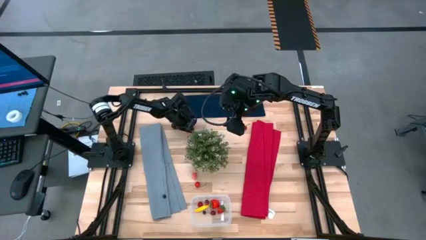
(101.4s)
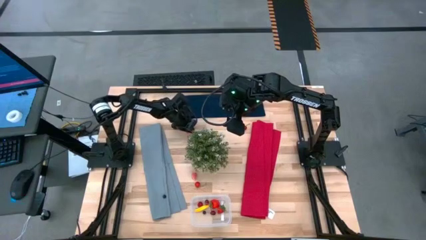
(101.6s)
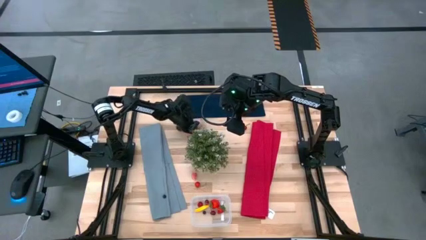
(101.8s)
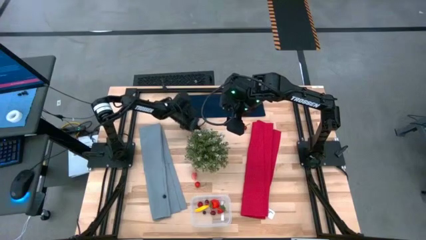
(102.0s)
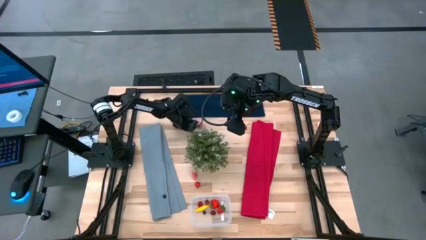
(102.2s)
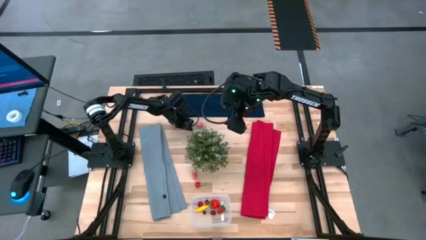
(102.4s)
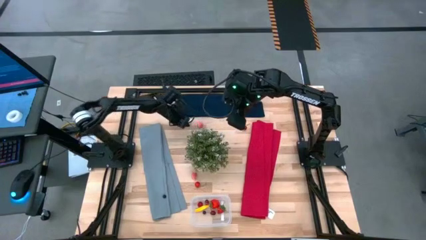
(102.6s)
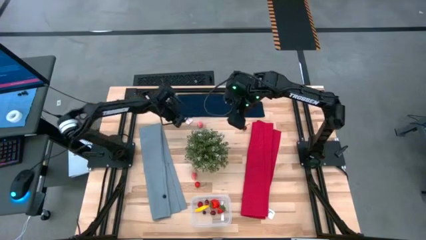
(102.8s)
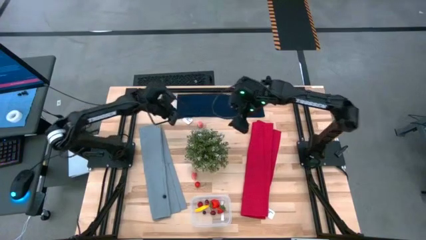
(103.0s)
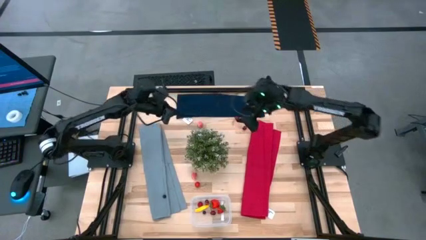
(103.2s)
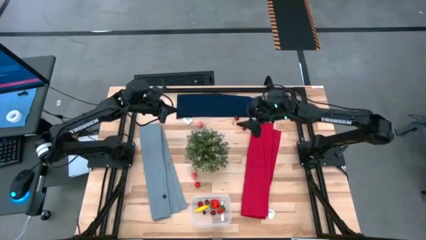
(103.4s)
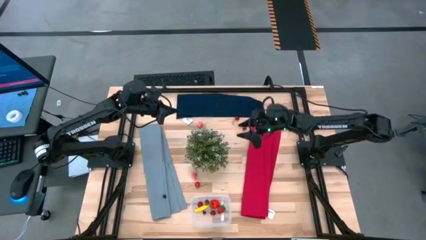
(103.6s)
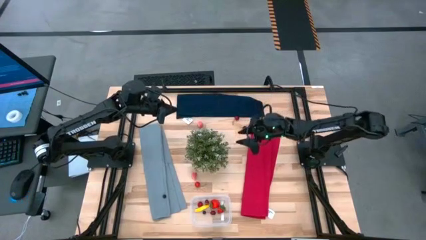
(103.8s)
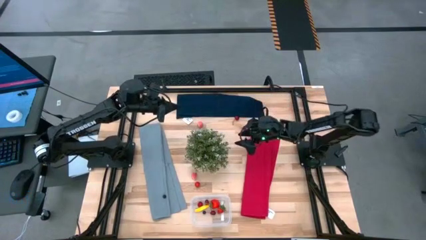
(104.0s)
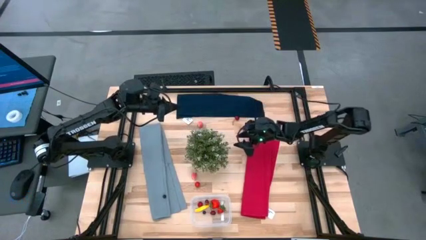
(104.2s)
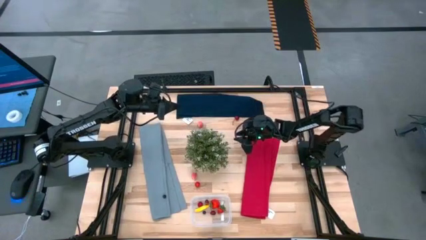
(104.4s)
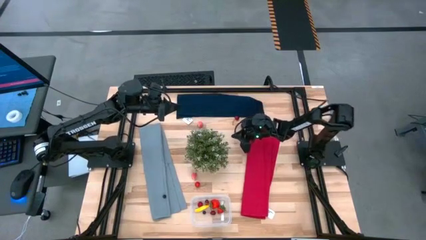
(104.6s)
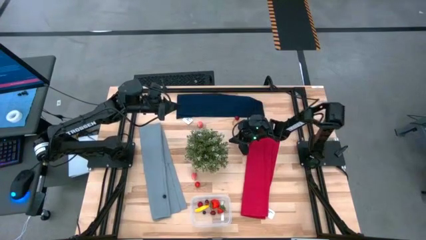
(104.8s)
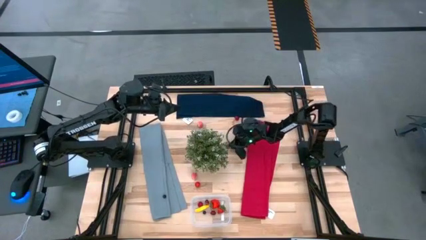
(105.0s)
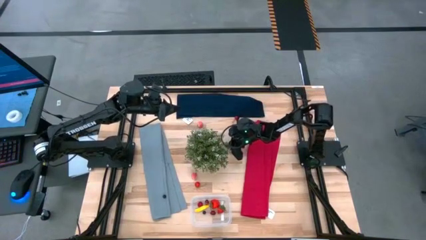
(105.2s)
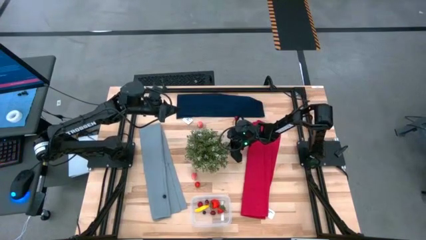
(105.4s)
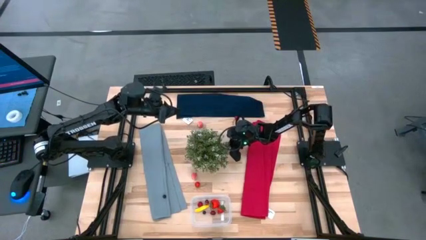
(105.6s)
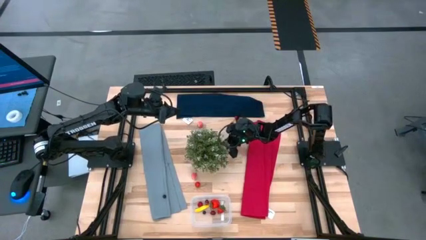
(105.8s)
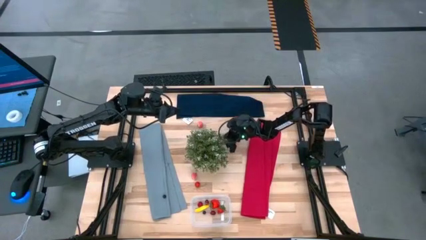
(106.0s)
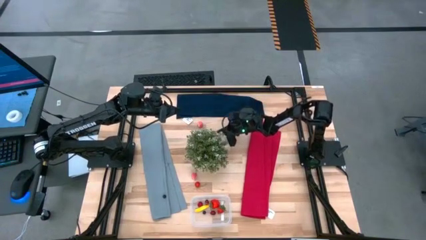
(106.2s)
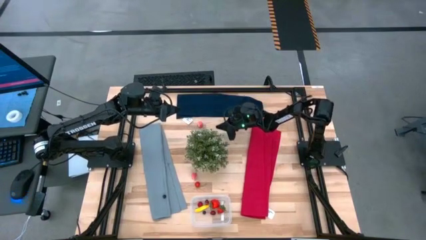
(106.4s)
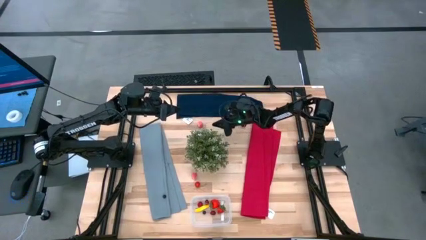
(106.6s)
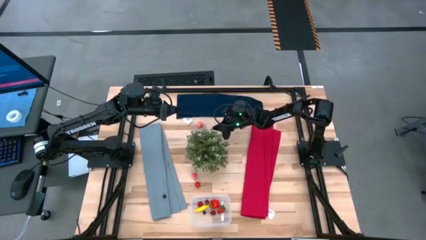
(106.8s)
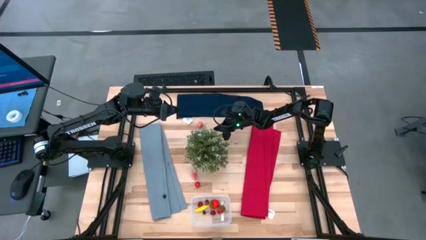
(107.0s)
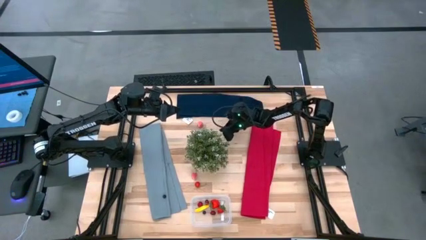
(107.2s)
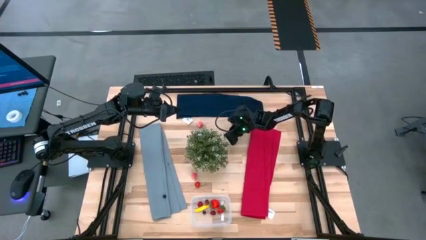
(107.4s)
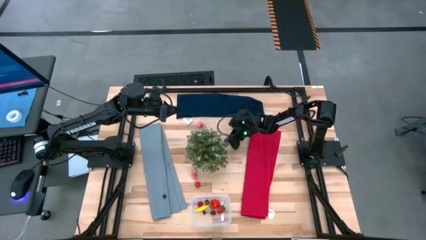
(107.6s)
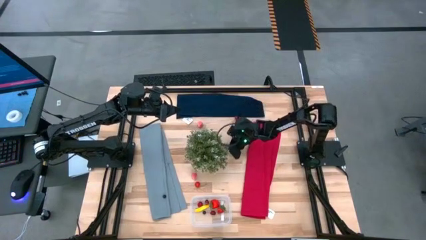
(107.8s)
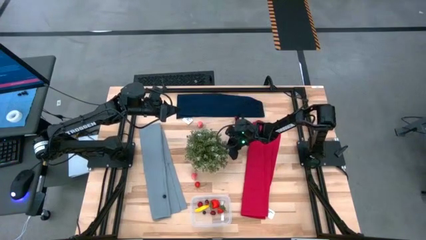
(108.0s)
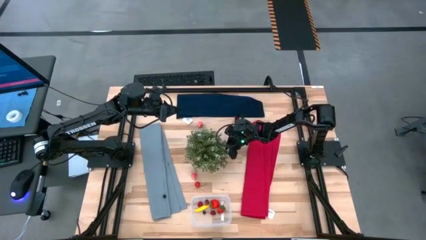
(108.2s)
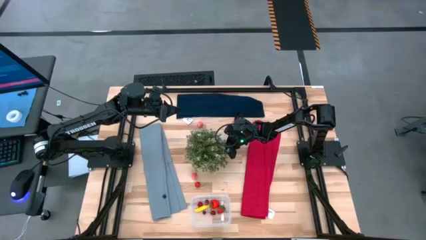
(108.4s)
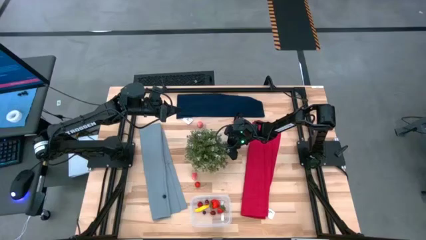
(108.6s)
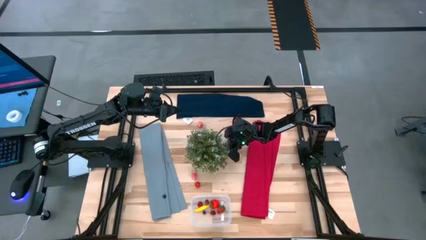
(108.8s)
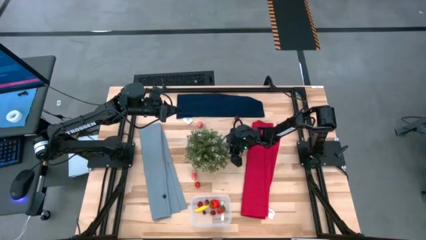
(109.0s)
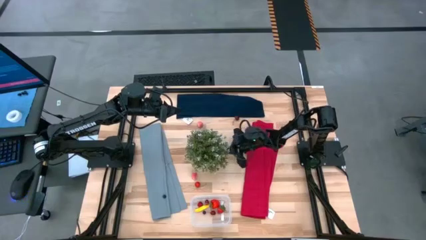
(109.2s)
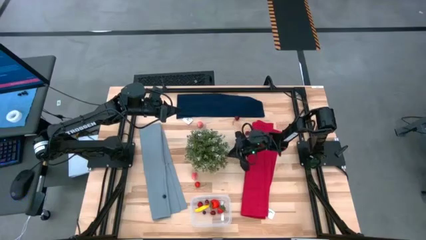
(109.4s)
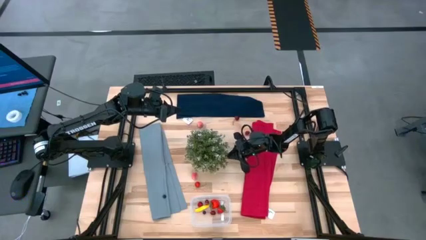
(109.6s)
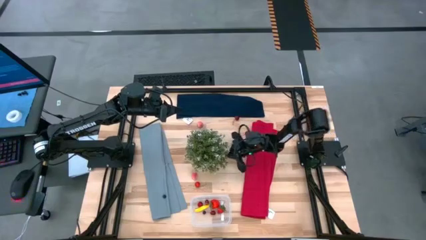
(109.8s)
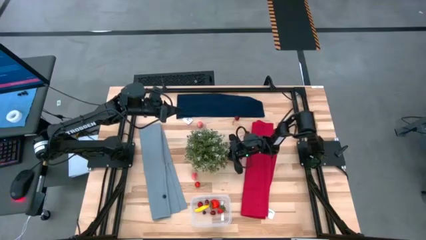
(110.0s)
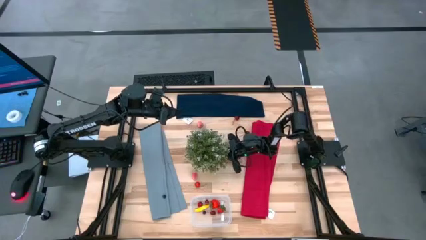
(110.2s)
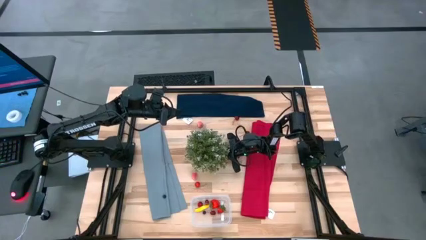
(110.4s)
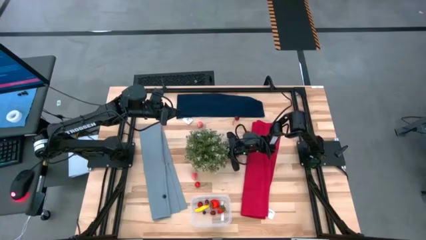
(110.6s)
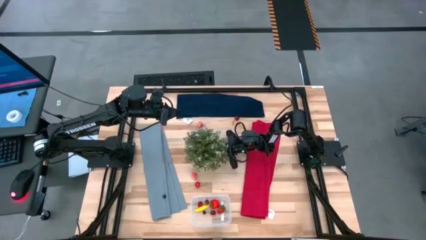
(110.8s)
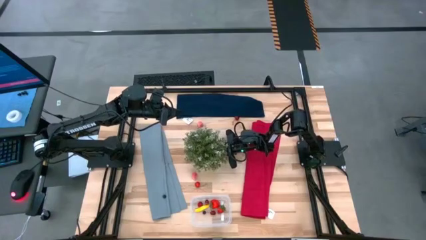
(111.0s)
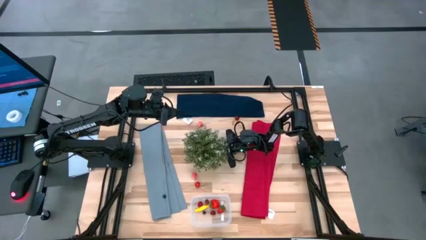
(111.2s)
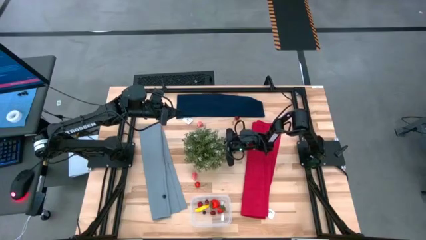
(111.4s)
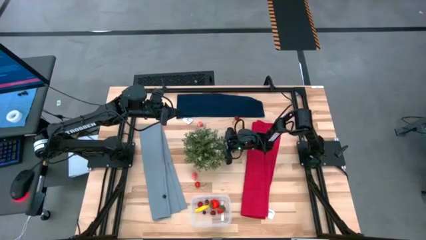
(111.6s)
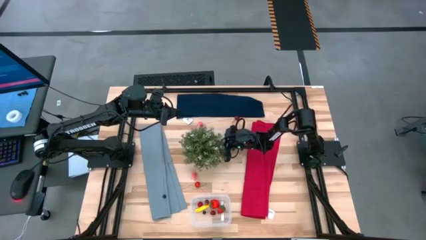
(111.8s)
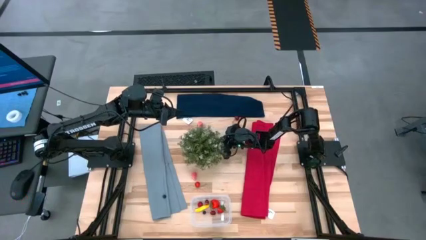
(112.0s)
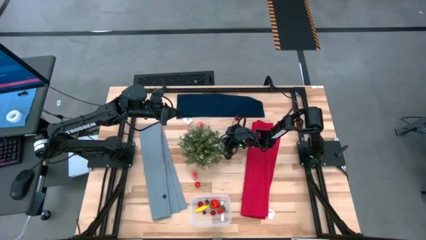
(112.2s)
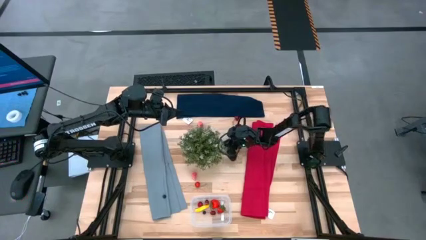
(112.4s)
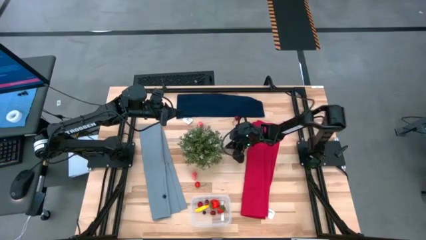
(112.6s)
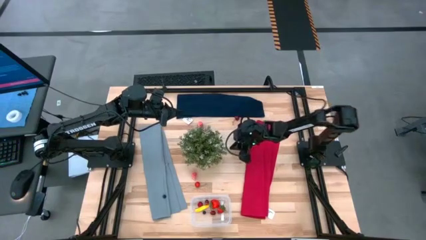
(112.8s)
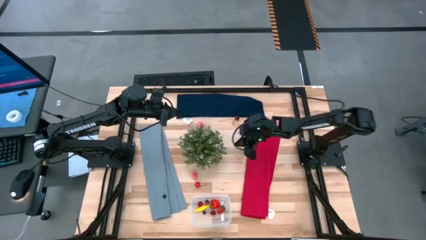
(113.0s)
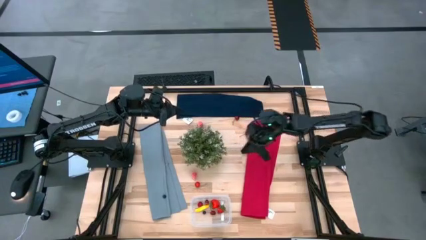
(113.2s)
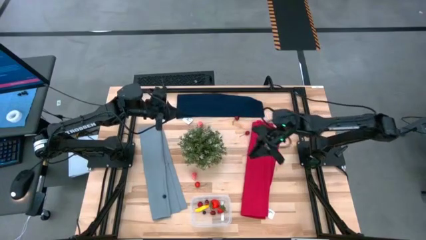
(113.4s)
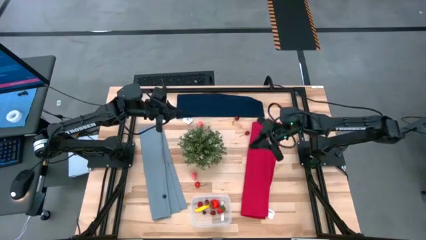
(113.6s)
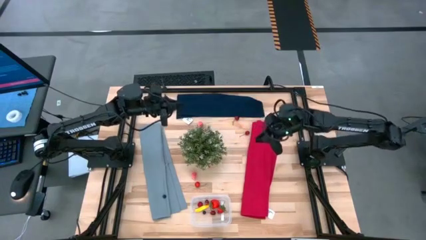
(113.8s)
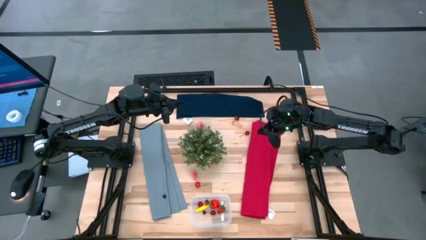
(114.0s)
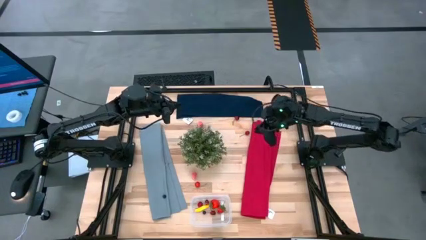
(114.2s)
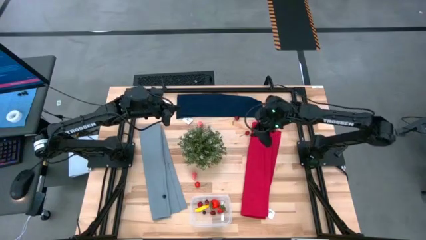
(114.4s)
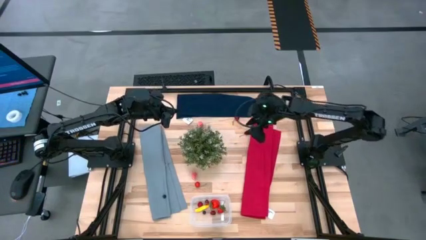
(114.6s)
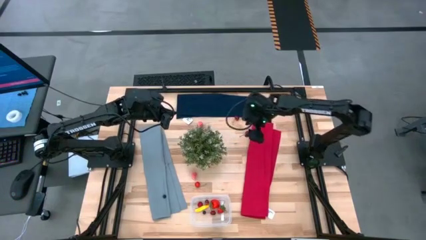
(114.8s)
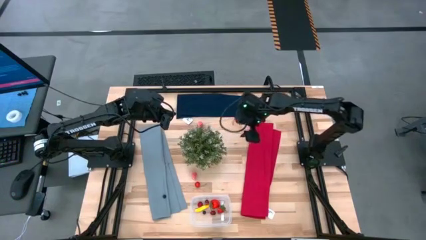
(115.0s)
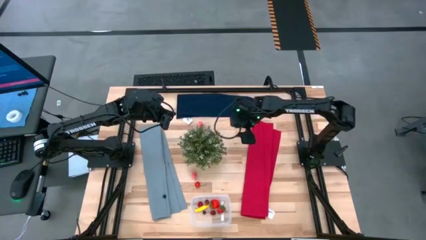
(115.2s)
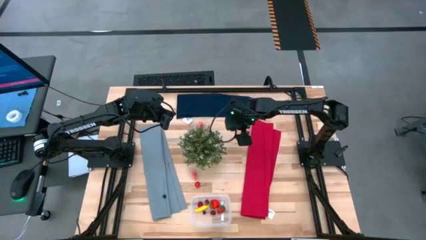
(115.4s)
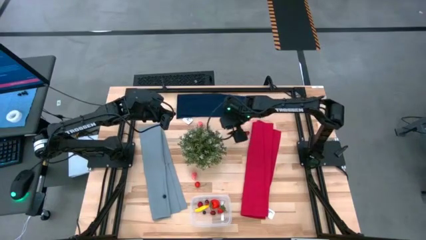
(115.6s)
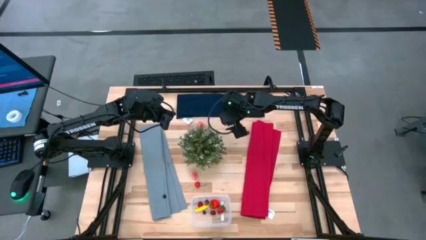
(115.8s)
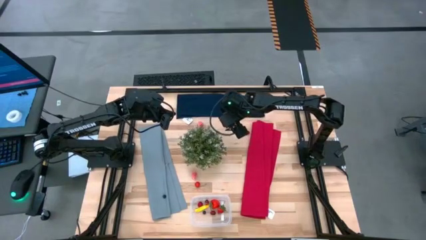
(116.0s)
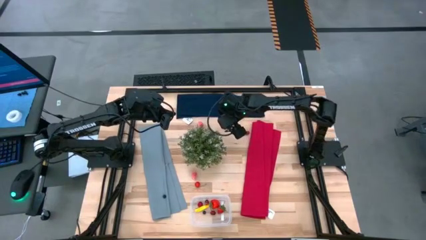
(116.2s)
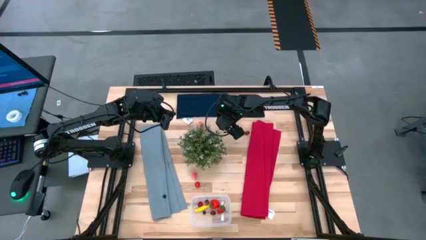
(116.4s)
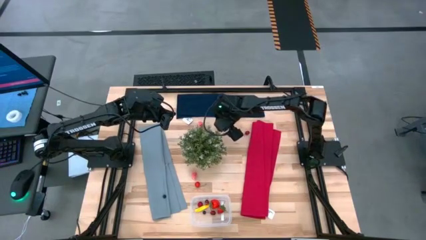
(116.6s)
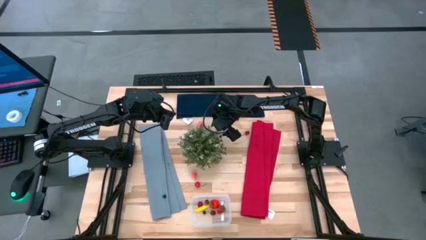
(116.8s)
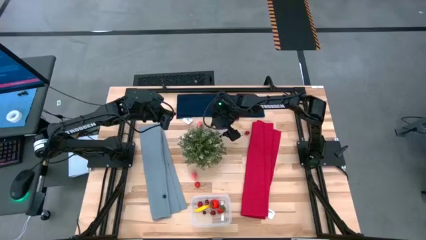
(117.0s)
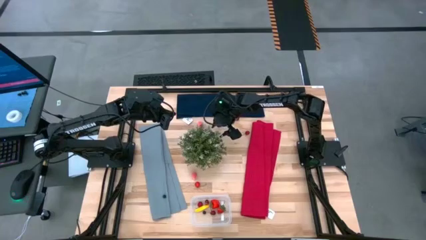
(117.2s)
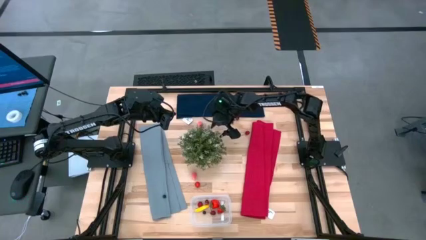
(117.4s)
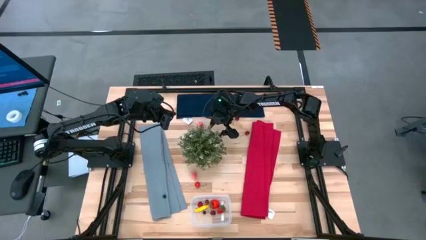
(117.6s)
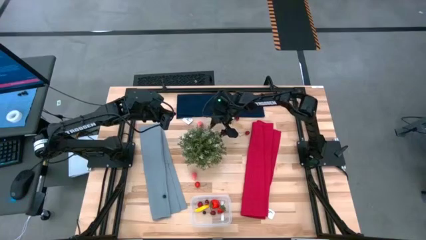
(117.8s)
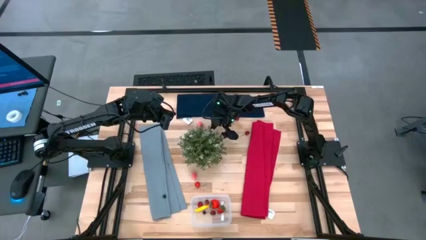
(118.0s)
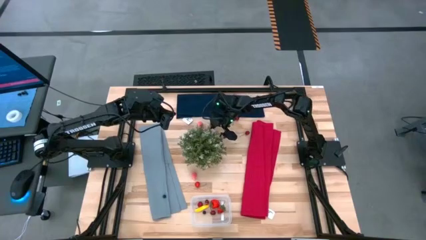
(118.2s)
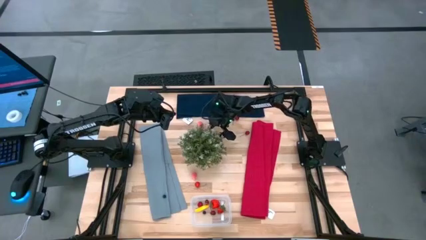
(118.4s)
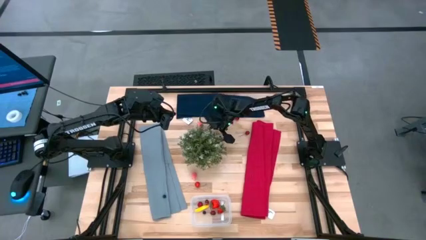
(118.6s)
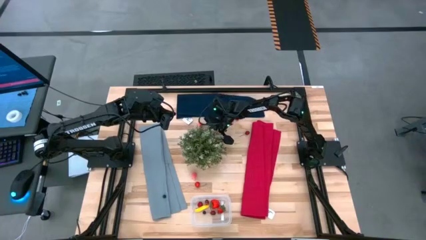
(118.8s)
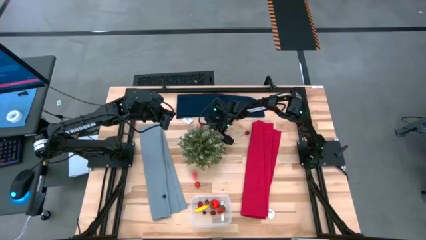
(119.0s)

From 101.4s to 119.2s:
Task: Pick and placing Produce into tupperware
Put the grapes into the transparent container
